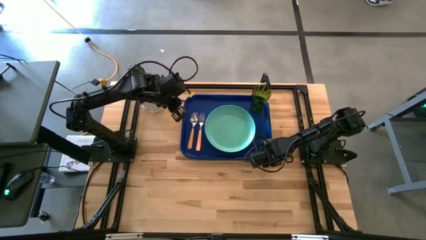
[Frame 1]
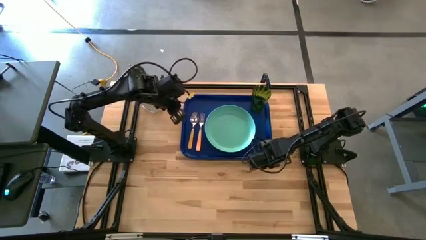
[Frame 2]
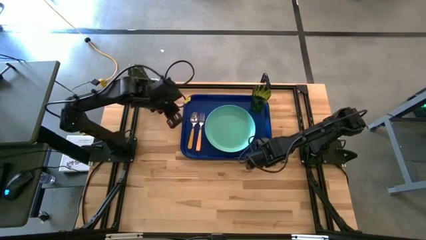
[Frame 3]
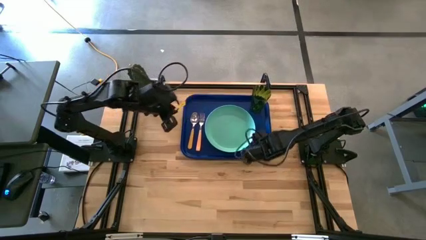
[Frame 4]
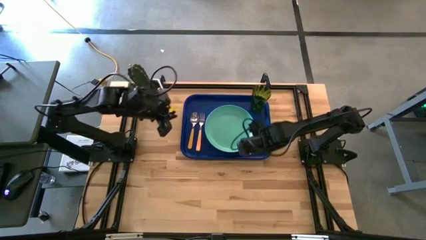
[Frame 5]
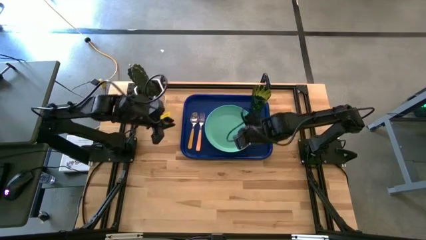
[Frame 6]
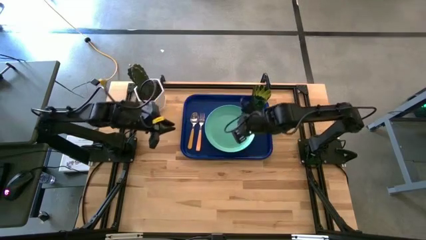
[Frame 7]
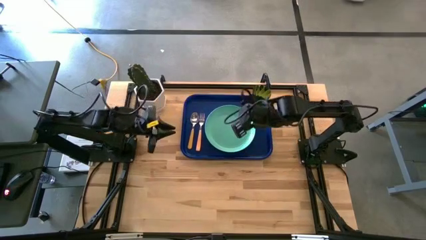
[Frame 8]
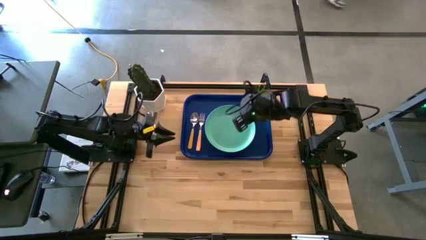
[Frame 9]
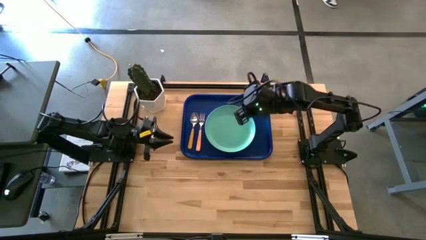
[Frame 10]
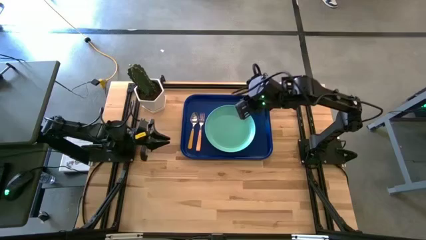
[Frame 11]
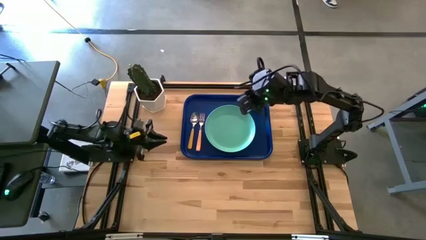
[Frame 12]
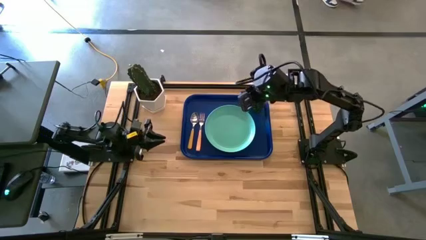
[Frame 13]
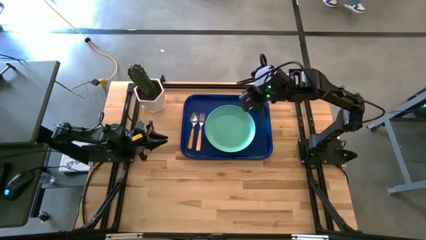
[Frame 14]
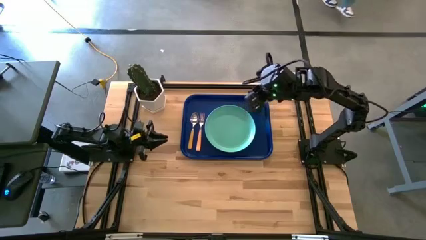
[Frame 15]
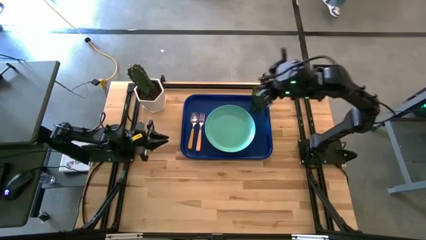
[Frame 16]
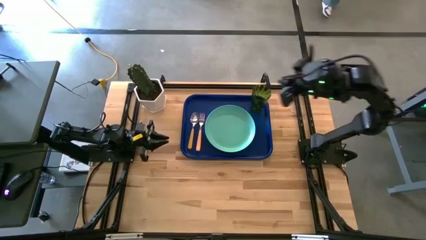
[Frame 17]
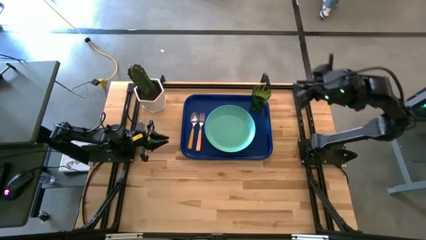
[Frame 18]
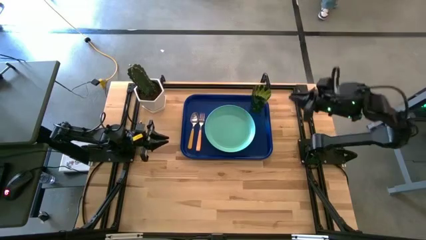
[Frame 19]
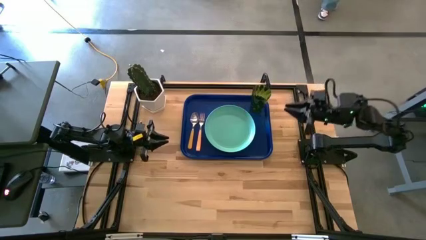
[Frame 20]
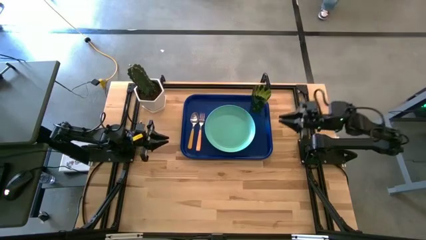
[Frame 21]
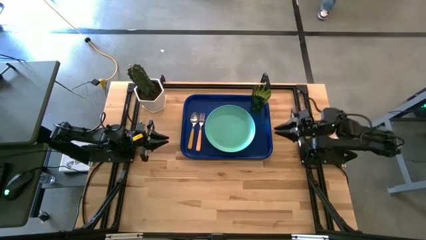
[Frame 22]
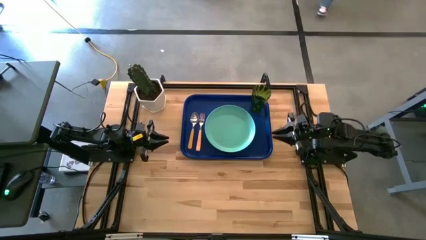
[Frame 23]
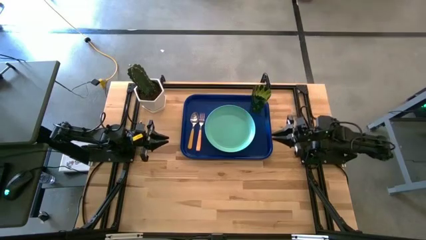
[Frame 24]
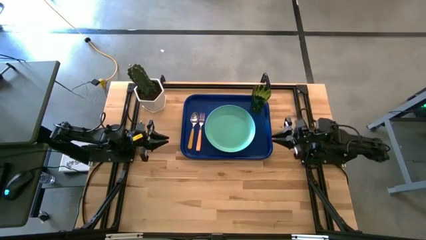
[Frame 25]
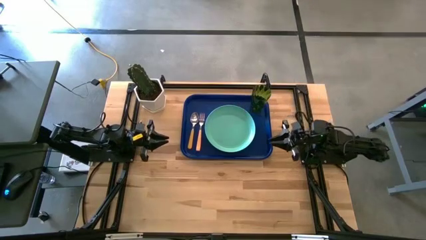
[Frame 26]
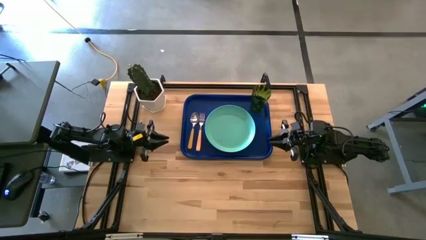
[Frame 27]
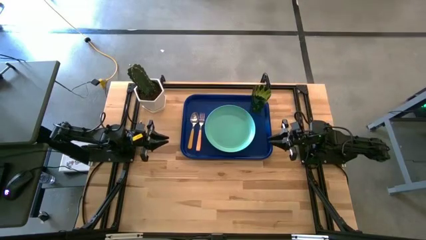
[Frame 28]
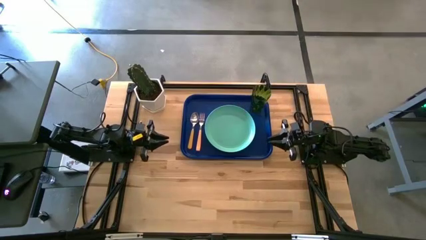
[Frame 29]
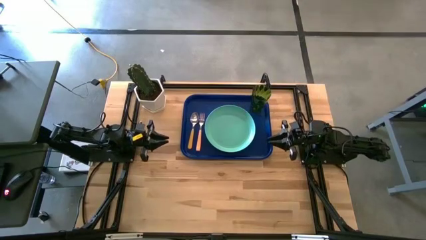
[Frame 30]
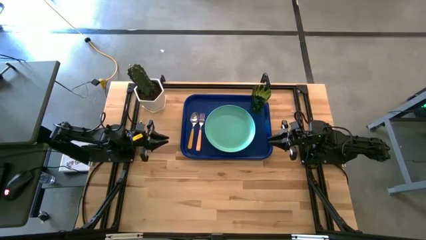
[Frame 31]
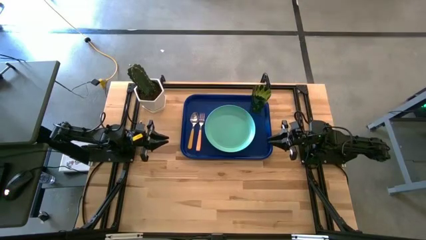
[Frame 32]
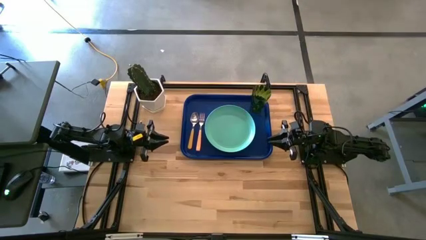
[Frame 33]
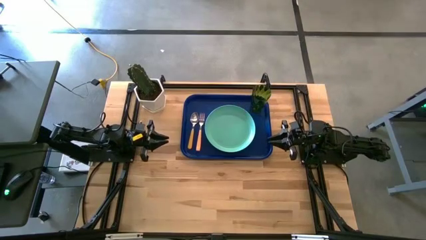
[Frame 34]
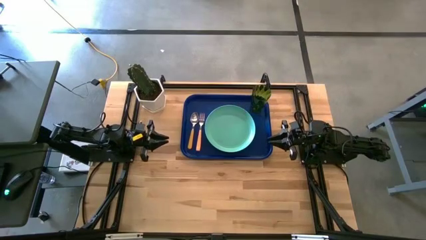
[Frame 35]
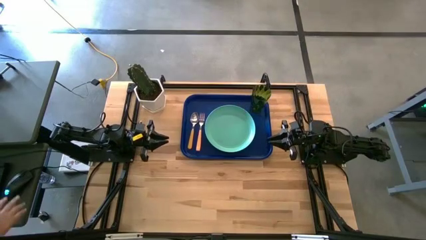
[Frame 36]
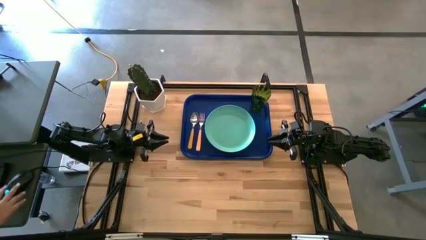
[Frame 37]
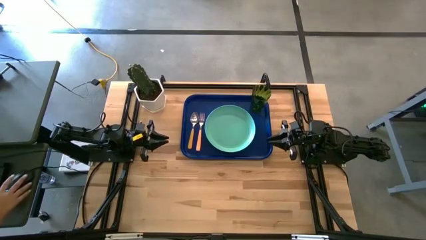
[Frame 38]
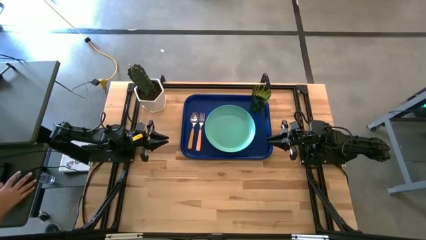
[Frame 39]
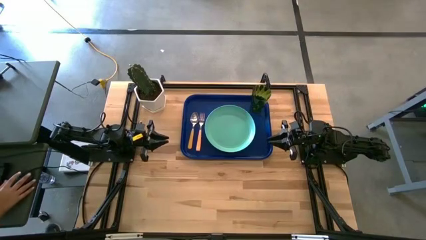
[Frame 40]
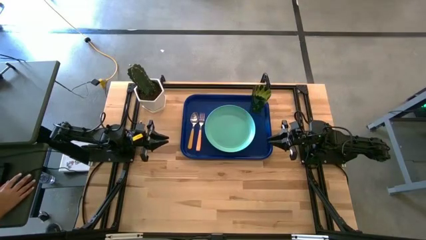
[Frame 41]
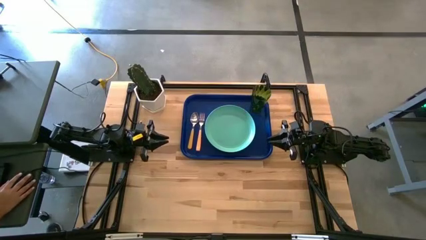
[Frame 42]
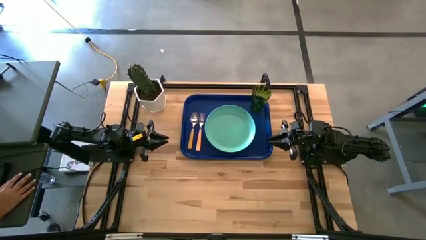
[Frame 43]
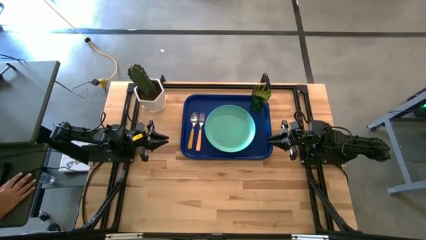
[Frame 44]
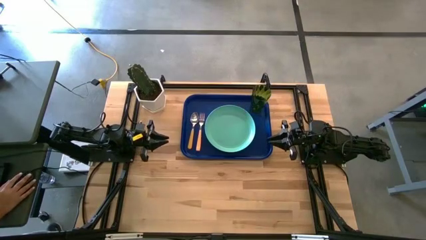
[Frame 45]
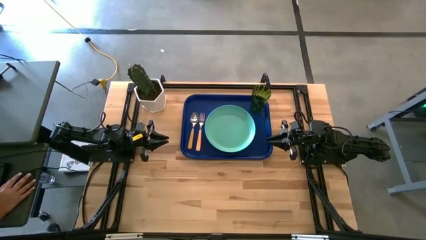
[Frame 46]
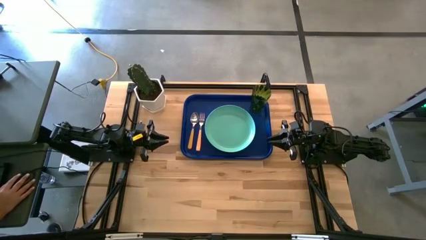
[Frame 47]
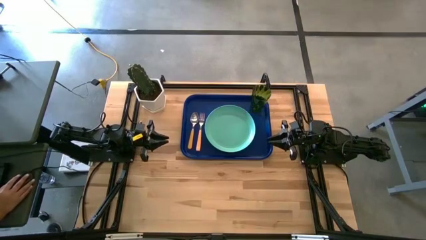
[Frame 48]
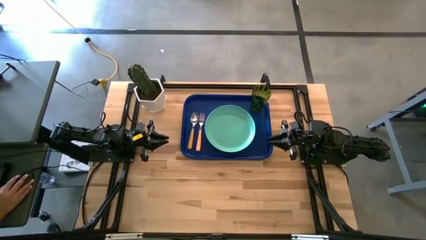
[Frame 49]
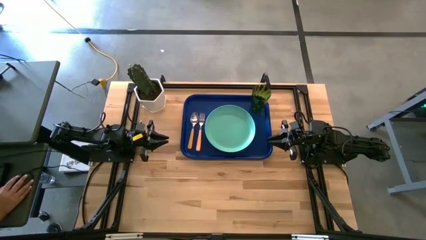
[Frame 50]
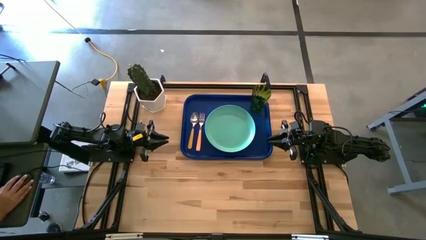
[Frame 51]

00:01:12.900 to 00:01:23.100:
Task: Pick and place plate/cup/fork/spoon on tray
Return to Home Position

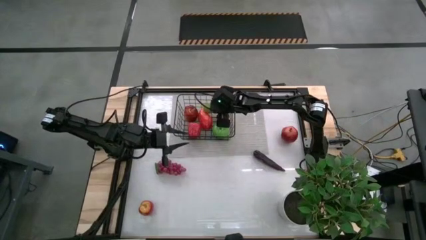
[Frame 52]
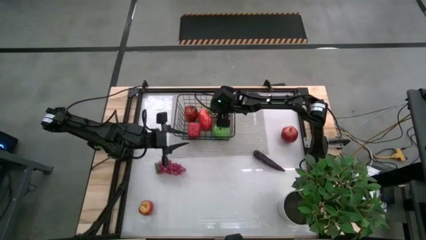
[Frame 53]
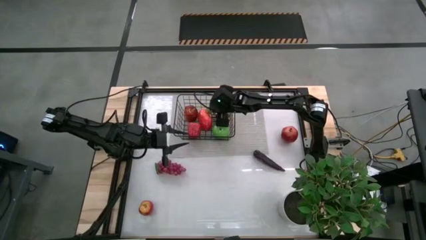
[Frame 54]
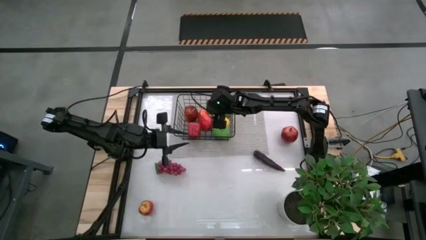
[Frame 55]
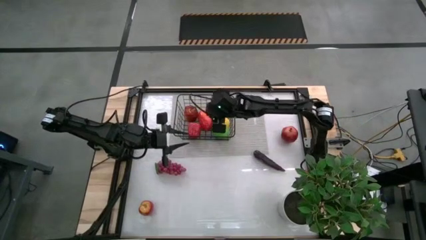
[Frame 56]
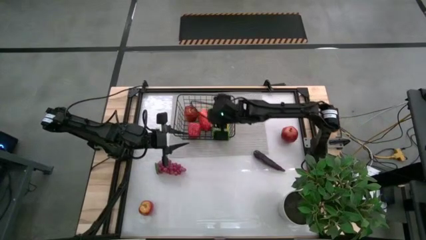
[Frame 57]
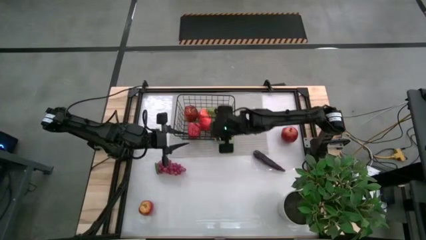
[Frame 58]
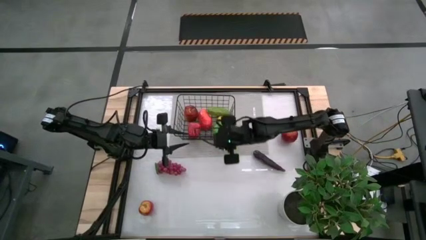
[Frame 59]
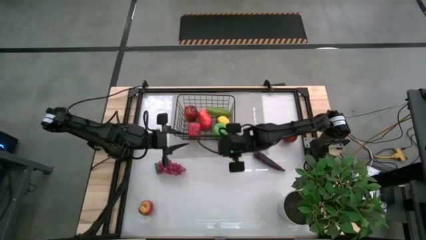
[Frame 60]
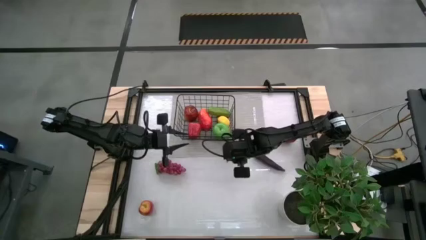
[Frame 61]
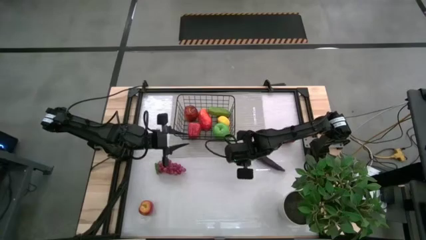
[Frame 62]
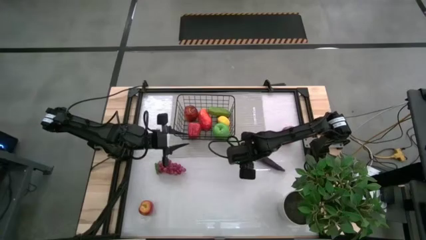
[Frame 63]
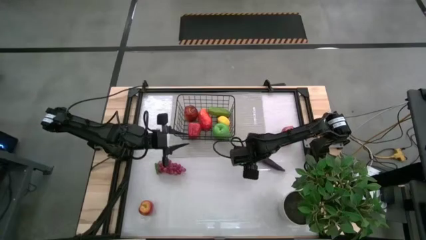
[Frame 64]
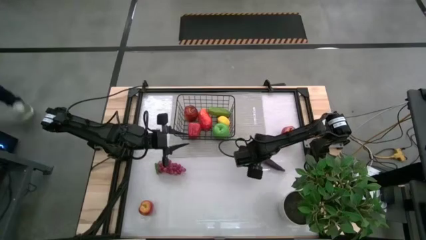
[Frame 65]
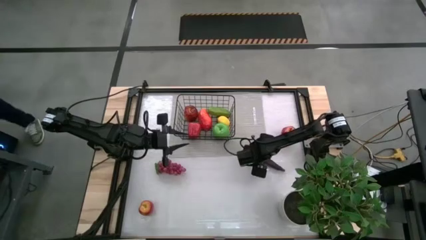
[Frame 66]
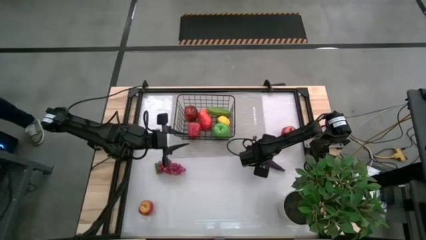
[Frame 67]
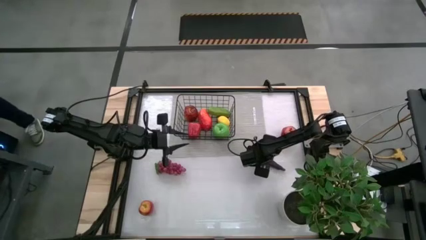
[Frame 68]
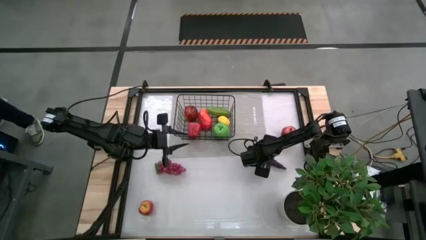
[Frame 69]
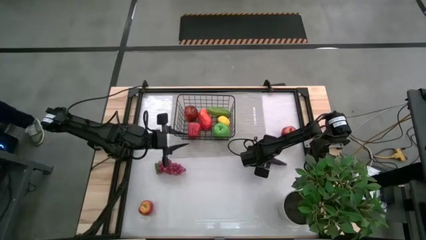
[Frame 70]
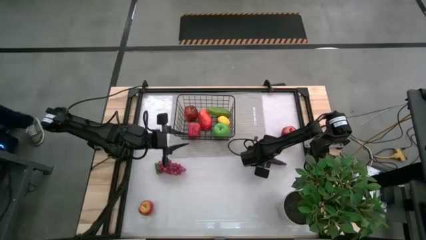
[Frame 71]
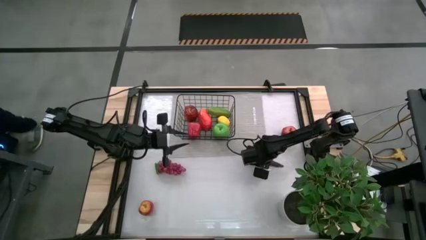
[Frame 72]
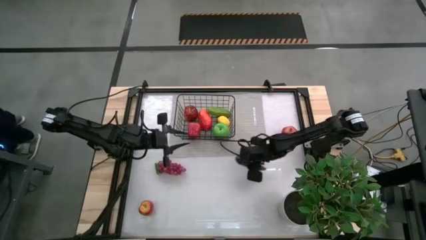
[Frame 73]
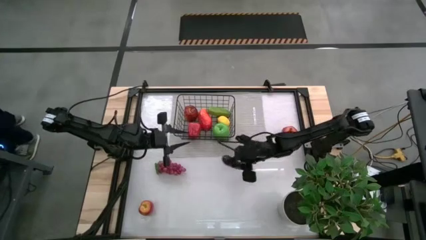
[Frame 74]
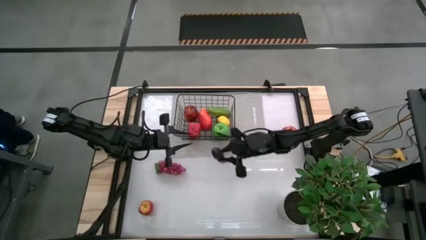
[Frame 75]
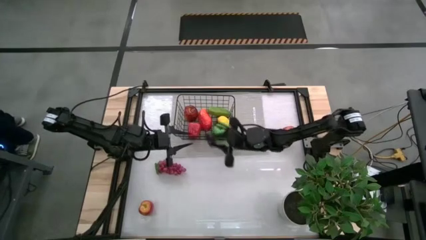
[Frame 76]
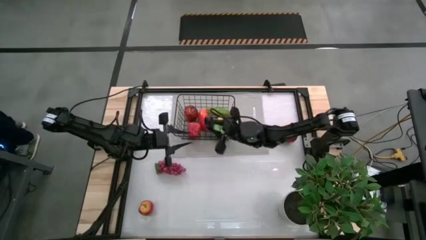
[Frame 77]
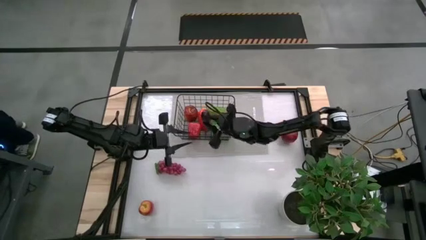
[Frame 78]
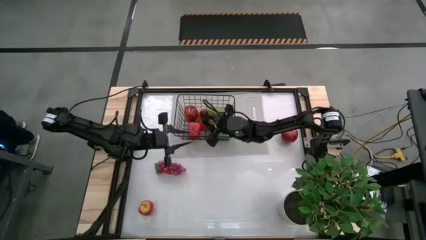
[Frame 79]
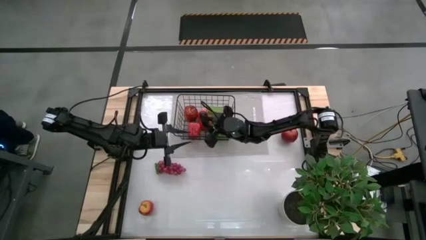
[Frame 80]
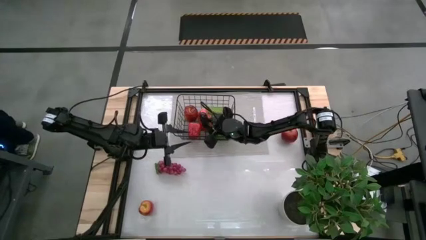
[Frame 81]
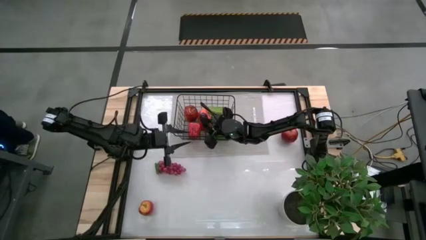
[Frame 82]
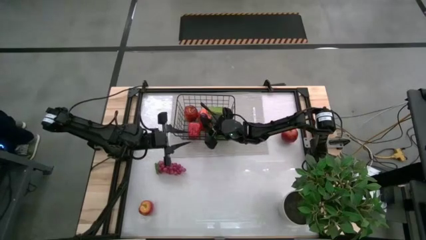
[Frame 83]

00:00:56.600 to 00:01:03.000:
Task: Build produce basket
Put the eggplant into the wire basket

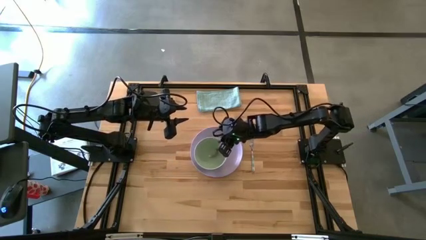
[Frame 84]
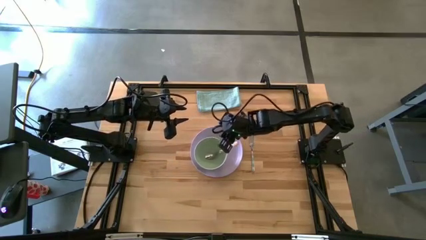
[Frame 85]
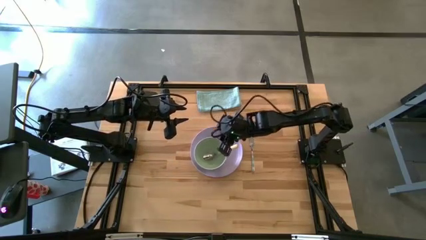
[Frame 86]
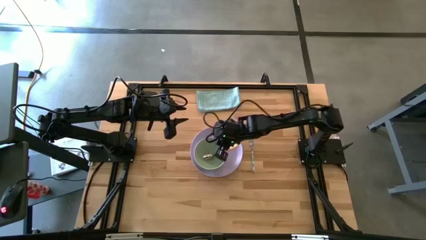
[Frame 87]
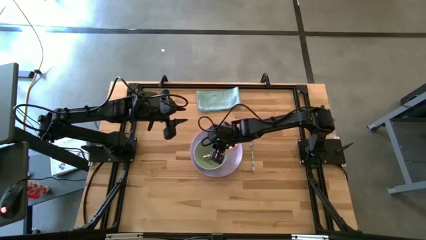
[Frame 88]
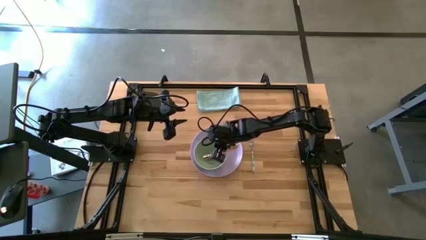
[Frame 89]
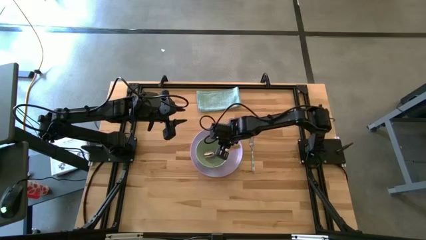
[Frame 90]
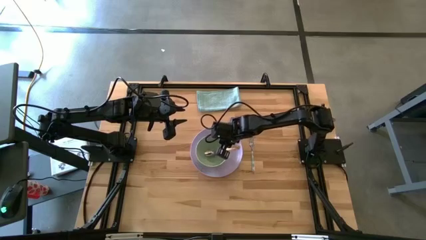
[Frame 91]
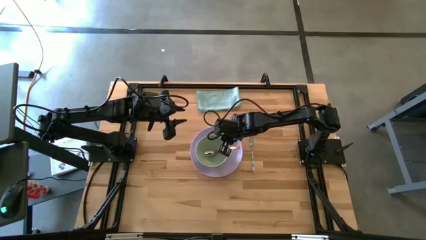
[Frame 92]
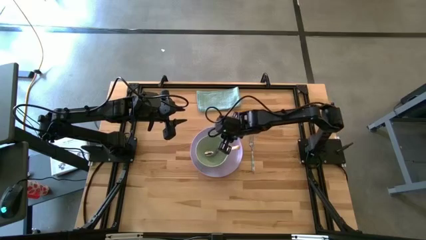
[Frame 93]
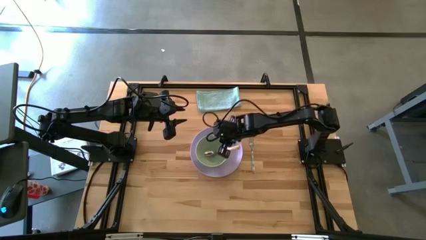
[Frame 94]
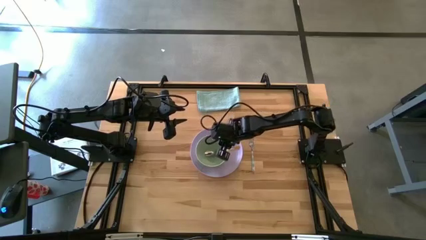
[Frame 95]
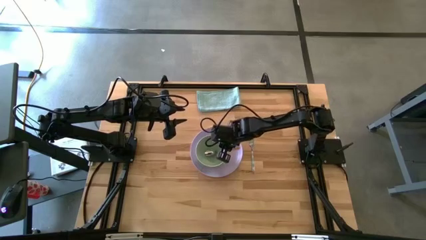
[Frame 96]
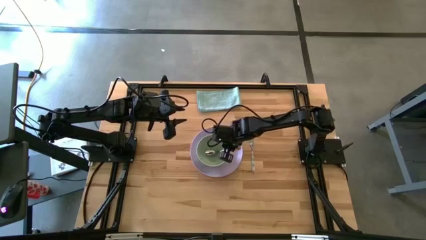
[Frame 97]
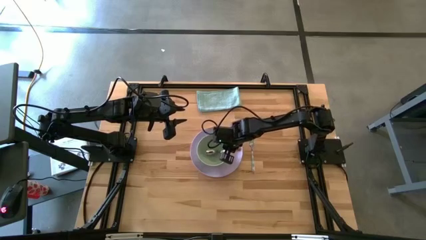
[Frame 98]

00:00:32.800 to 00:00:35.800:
Task: Set table place
Adjust the green bowl on the purple plate
